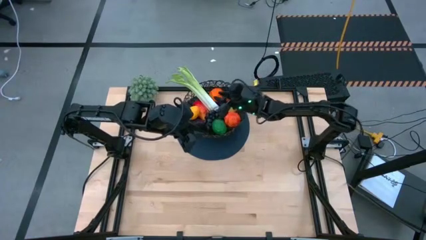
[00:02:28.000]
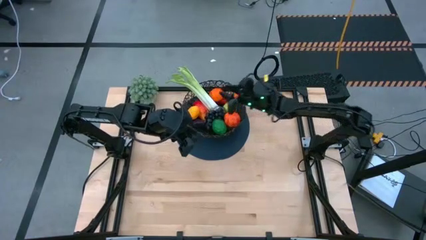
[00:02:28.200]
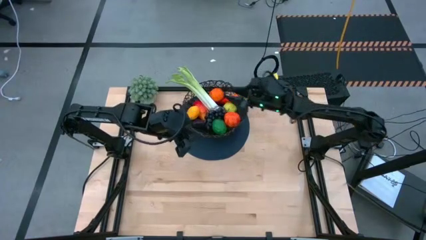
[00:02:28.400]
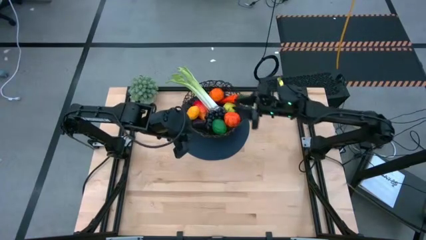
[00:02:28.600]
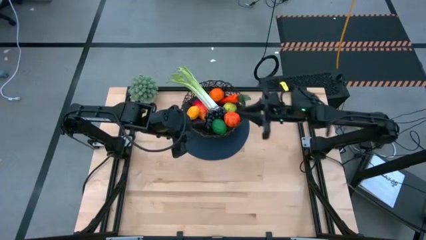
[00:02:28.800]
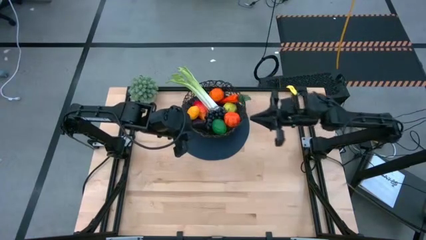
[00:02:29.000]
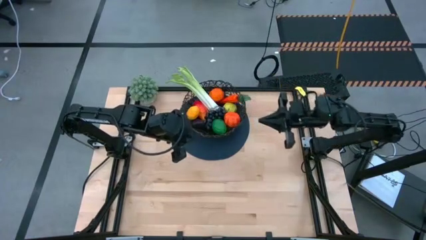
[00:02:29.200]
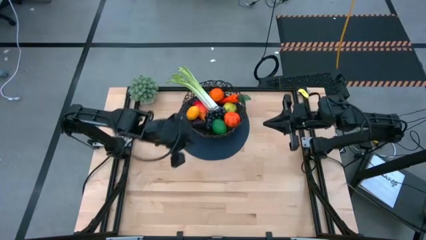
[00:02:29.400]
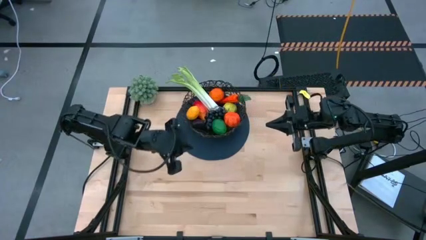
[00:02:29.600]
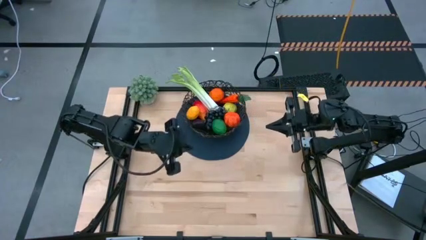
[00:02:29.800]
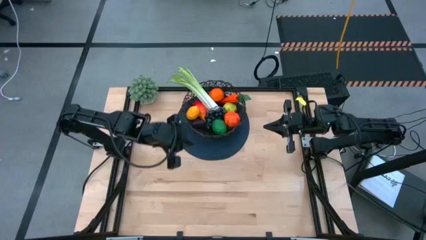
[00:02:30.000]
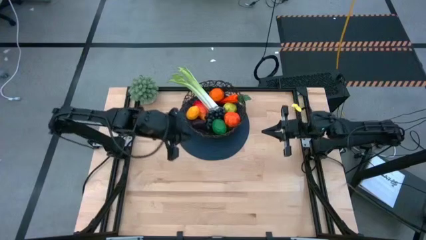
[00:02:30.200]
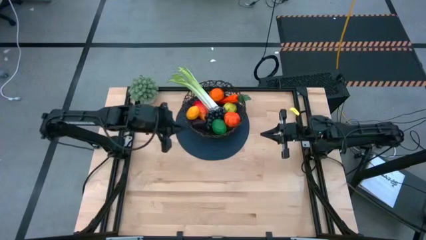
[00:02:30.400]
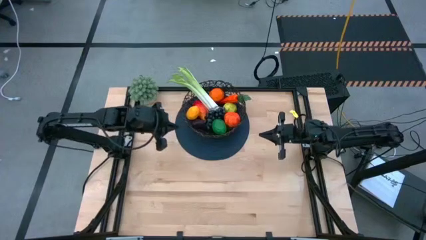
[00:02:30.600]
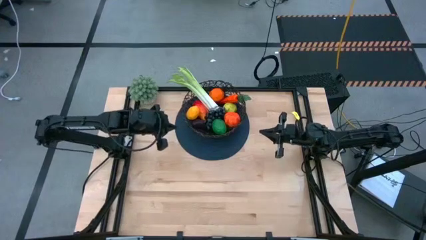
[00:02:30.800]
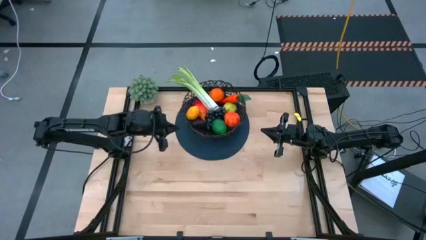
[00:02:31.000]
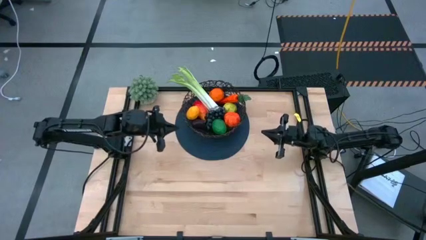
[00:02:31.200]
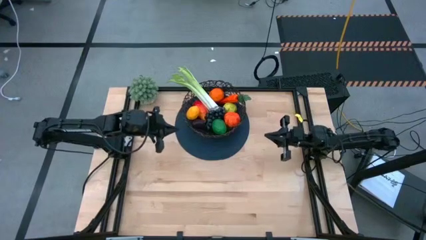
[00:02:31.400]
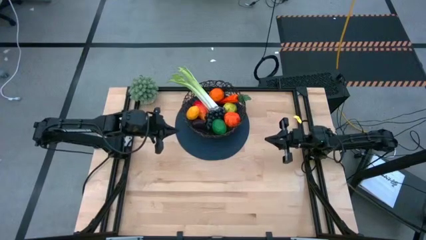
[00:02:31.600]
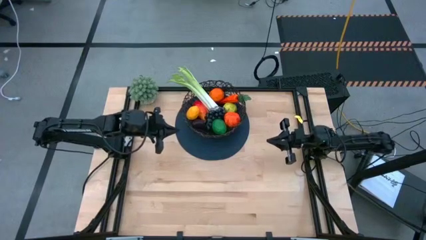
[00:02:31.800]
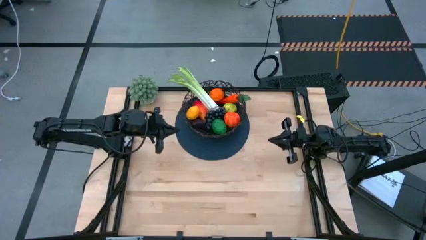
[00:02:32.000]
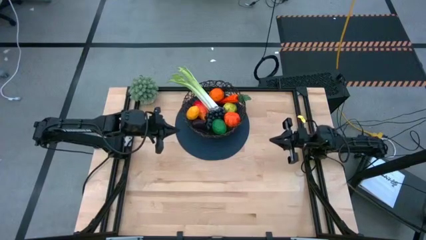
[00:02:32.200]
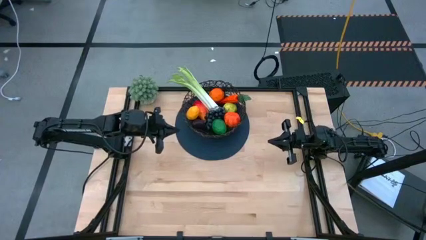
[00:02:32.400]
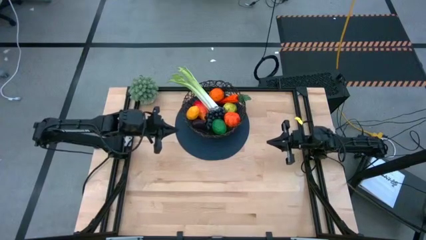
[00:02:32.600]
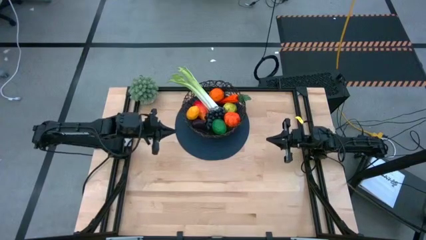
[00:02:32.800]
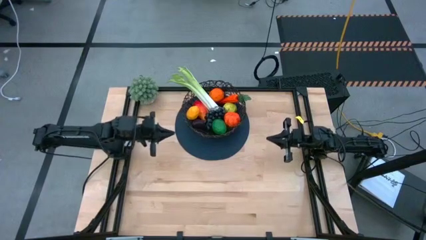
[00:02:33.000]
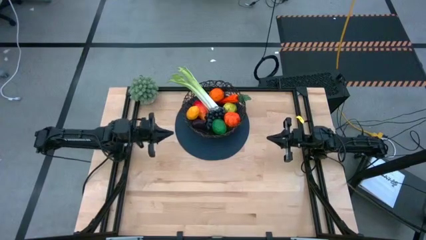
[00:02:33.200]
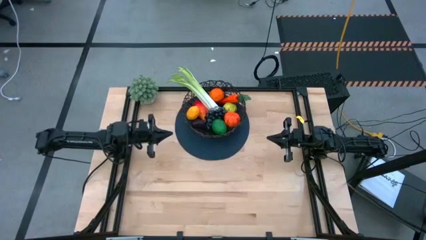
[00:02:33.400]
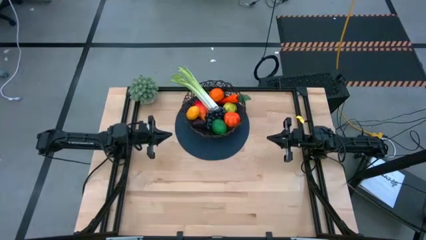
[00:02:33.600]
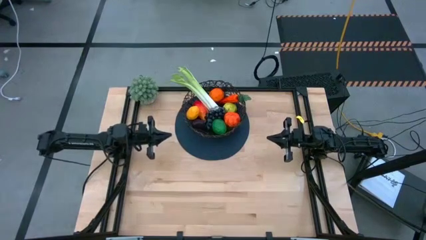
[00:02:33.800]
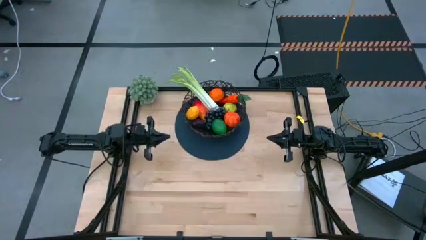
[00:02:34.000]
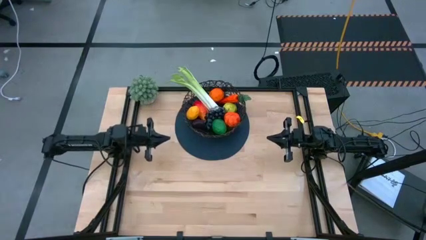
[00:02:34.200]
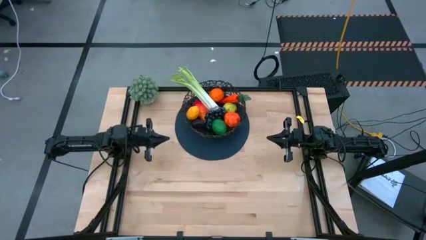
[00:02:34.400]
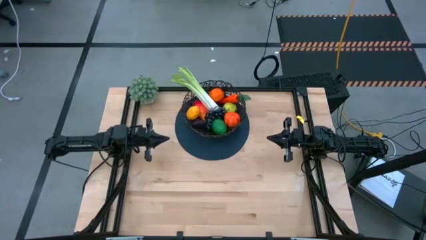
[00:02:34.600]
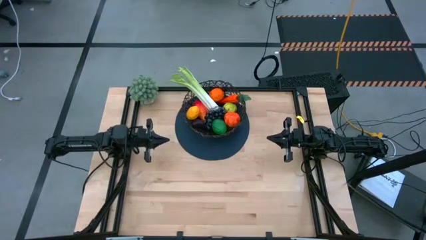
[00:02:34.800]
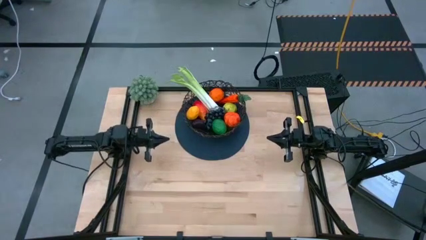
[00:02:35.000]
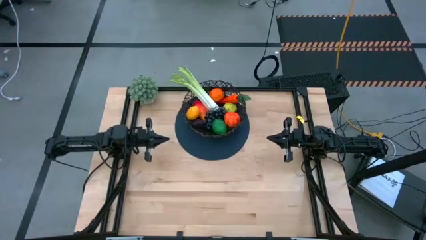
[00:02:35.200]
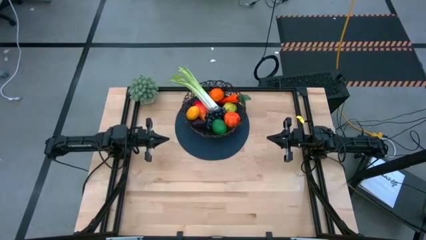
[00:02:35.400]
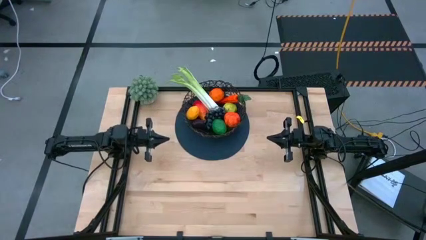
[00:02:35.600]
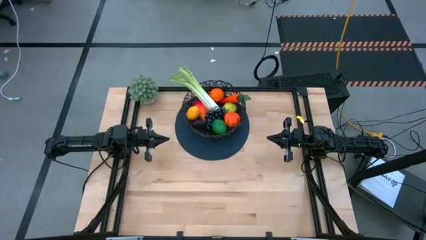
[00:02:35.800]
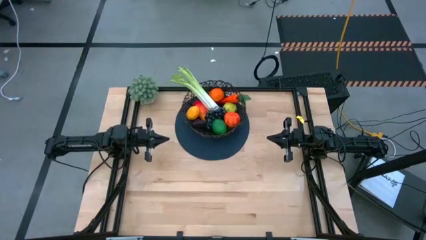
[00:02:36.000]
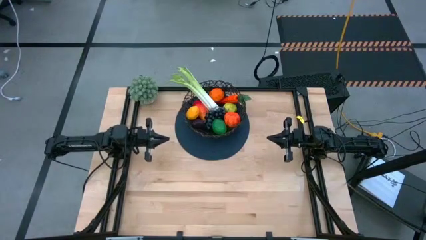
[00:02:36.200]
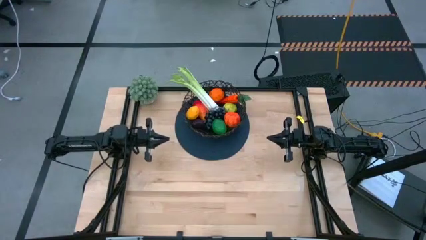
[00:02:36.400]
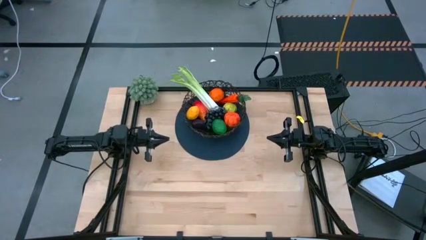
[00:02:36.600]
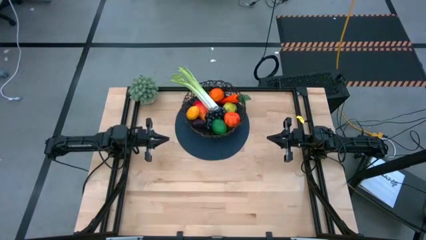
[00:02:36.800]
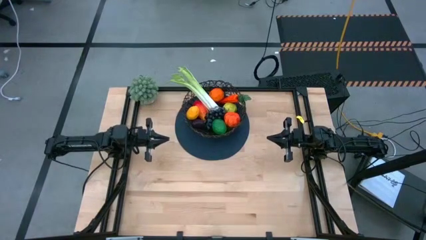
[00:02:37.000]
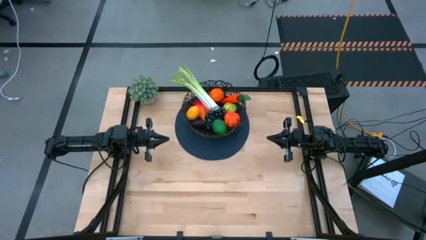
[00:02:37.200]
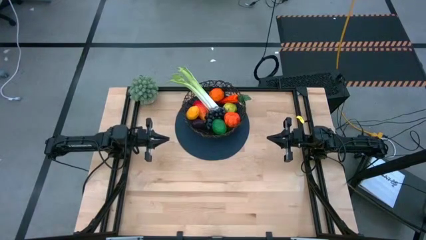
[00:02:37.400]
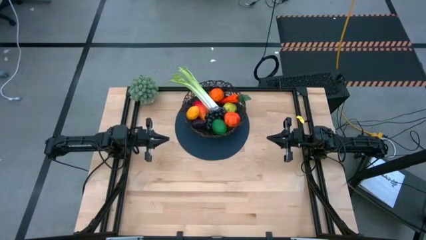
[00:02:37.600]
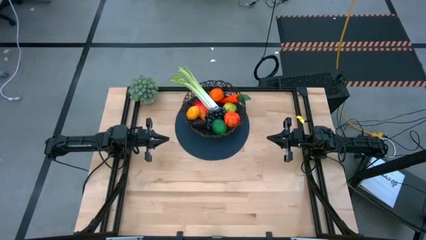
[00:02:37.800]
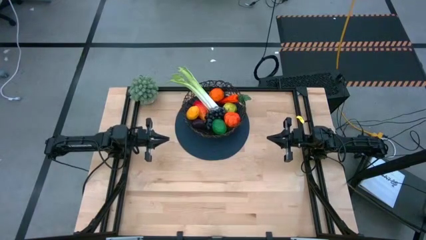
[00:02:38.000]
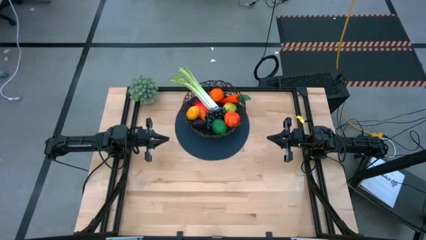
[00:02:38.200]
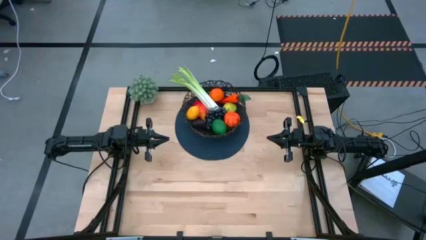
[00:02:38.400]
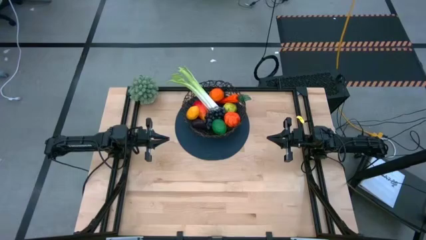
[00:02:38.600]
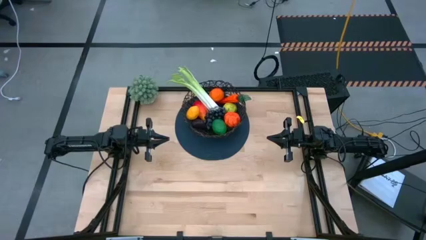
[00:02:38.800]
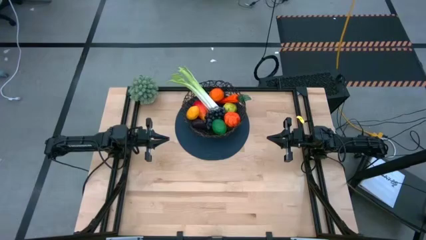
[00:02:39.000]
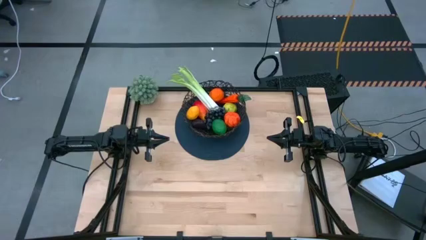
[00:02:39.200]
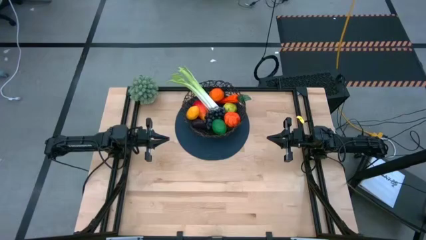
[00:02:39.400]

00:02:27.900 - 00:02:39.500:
Task: Build produce basket
Return to Home Position

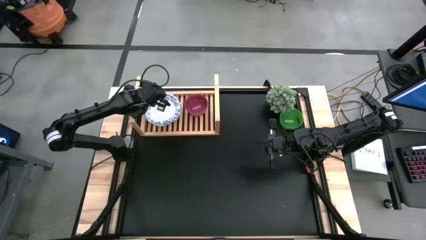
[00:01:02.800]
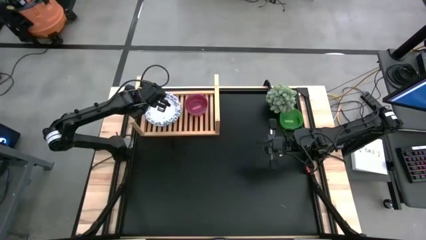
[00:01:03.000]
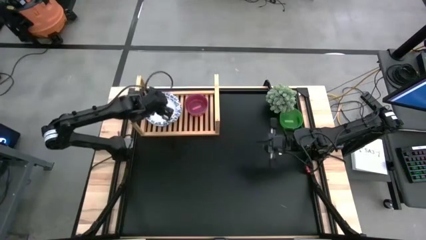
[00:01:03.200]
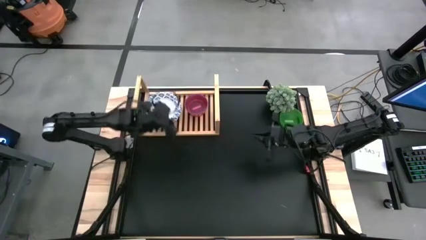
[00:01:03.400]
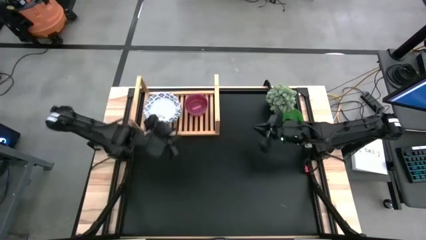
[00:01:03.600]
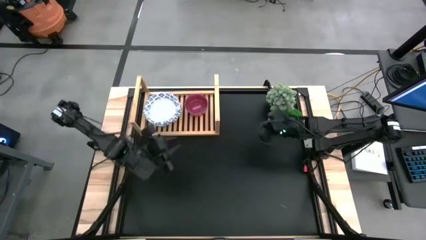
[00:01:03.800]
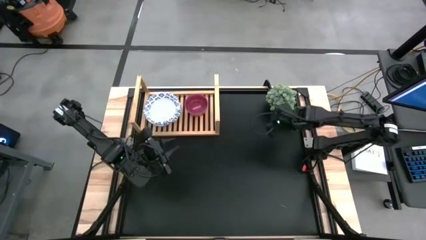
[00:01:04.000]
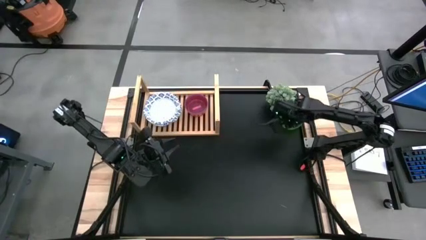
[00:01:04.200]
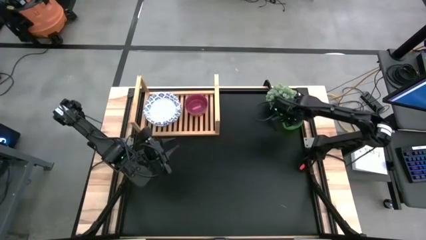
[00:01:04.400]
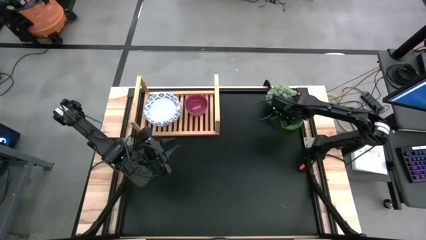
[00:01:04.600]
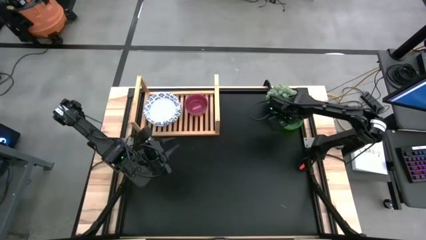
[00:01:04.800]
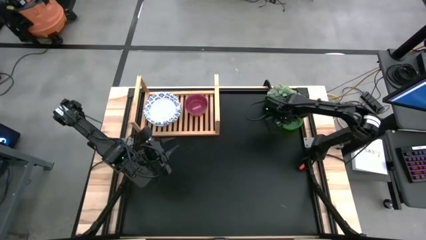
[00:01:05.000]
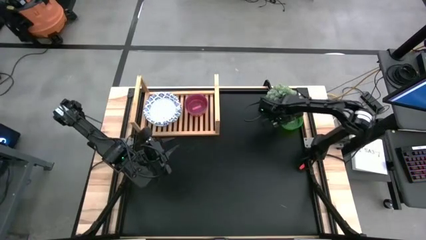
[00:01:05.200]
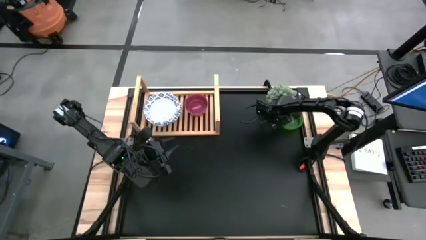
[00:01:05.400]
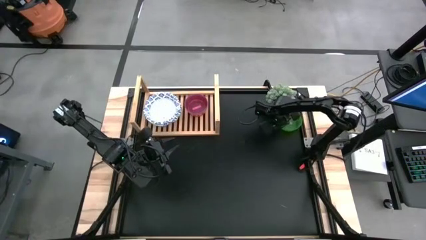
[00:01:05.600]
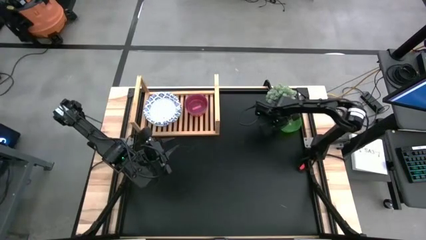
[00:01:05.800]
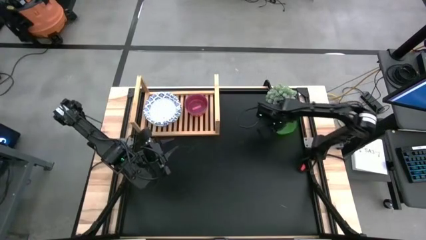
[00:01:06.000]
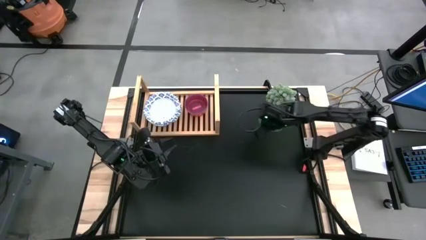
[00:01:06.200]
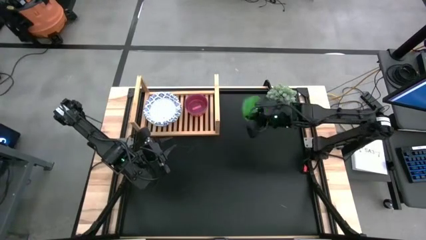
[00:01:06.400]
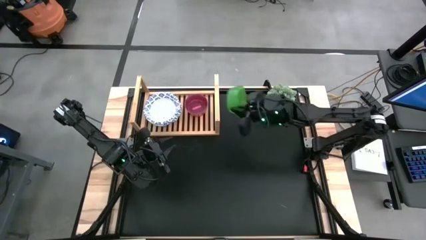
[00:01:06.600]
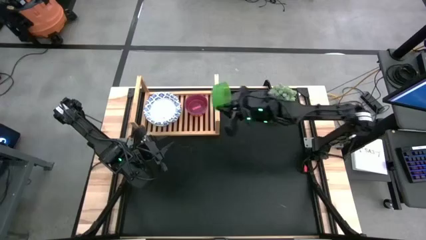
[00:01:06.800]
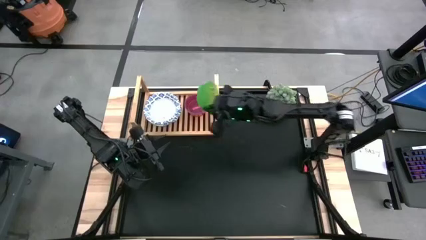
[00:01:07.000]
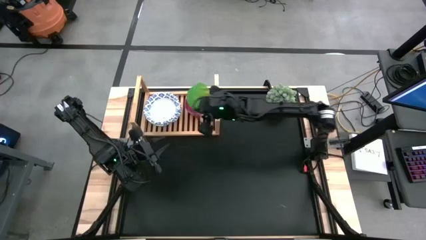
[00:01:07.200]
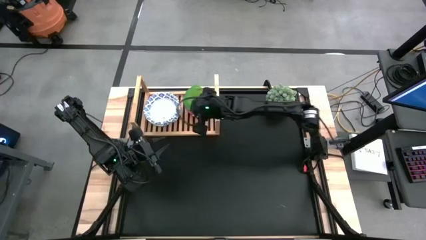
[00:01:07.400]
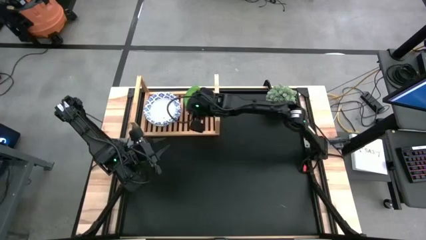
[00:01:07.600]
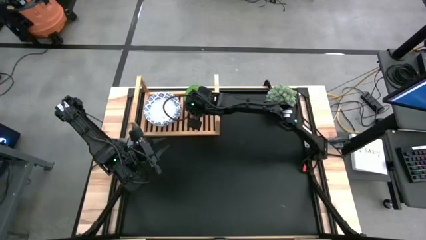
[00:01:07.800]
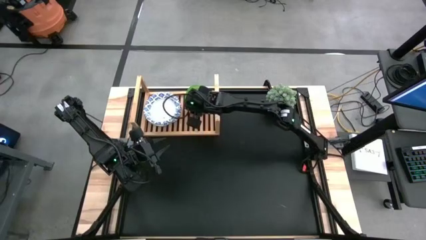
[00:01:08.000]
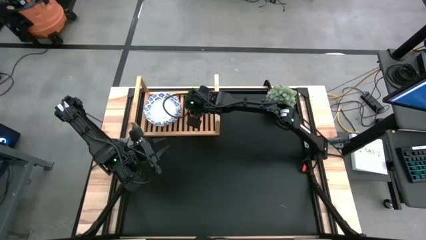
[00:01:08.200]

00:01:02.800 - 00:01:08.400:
Task: Place and stack plates onto a shelf
Stack the green bowl on top of the pink bowl
